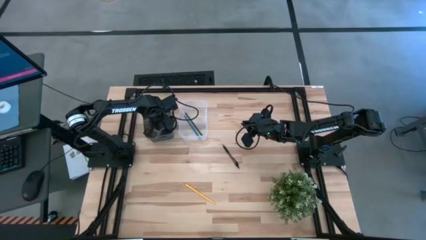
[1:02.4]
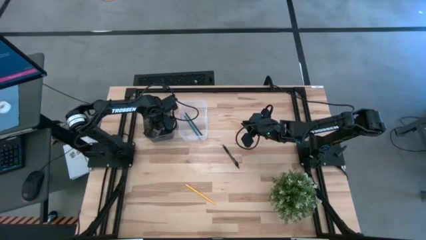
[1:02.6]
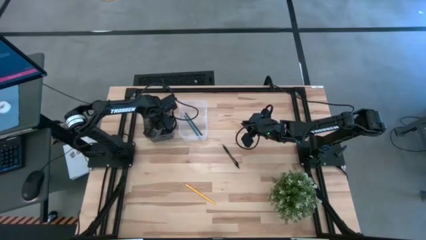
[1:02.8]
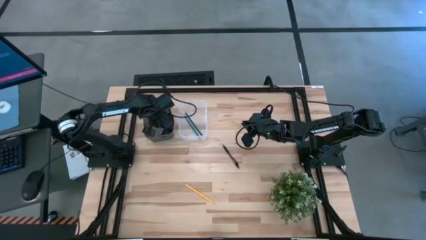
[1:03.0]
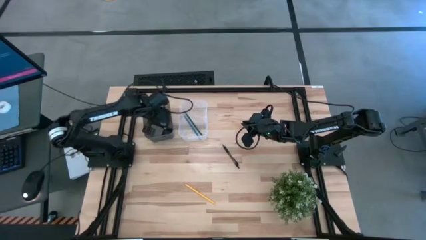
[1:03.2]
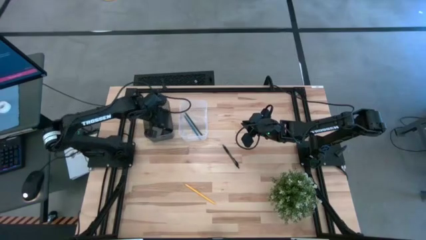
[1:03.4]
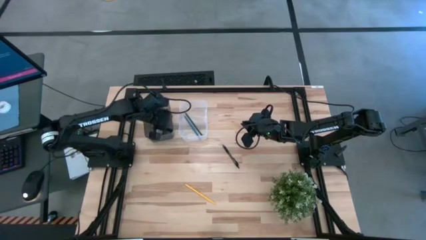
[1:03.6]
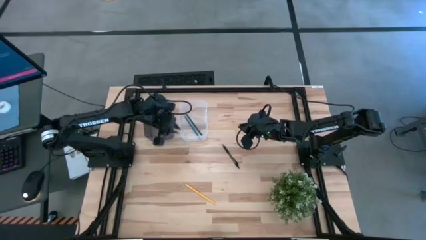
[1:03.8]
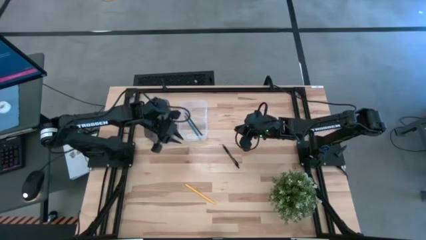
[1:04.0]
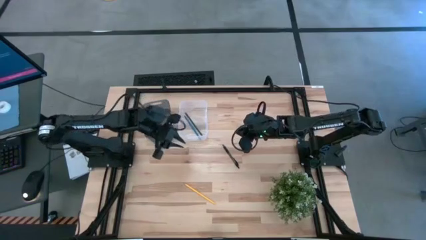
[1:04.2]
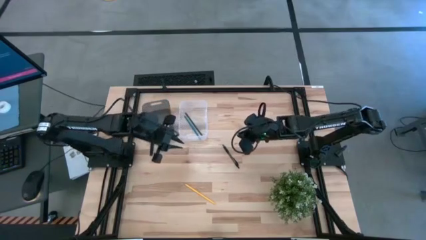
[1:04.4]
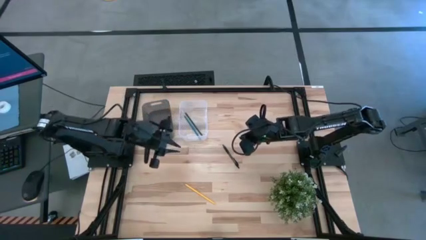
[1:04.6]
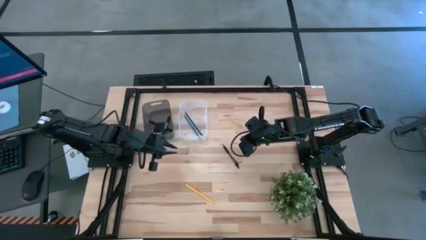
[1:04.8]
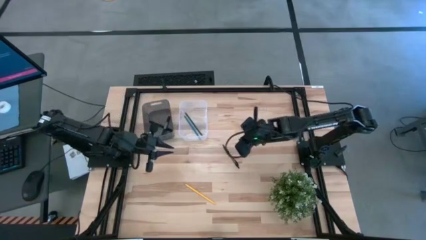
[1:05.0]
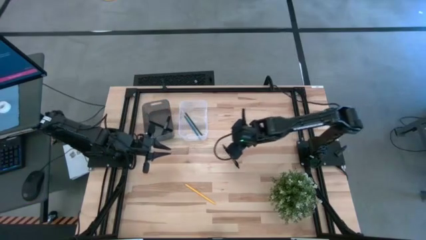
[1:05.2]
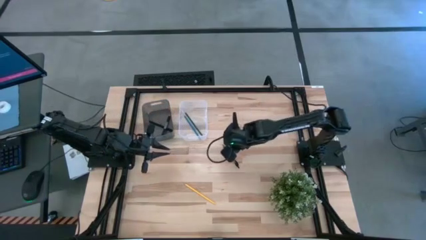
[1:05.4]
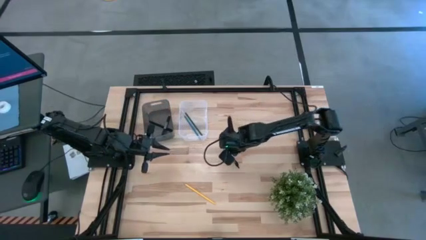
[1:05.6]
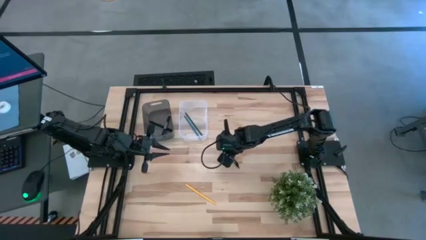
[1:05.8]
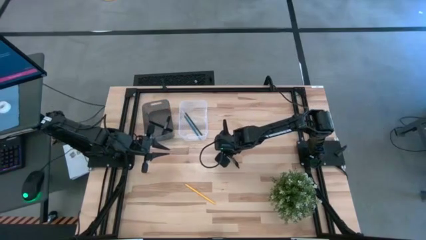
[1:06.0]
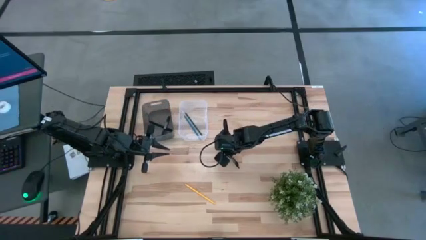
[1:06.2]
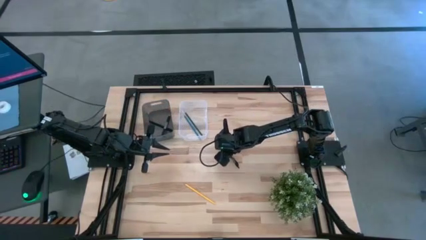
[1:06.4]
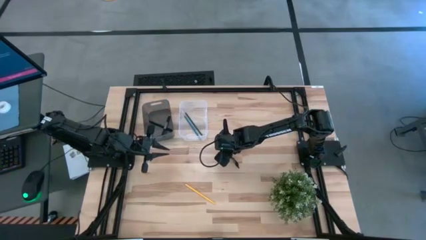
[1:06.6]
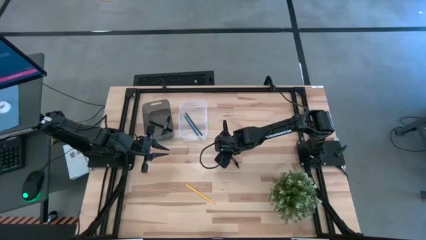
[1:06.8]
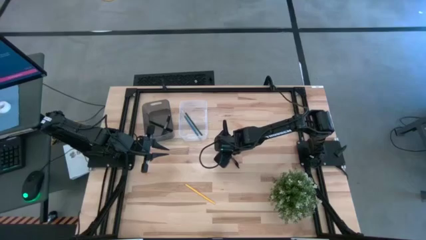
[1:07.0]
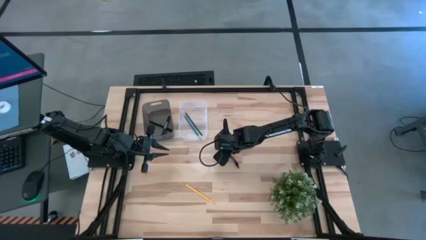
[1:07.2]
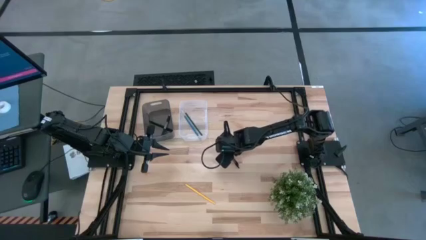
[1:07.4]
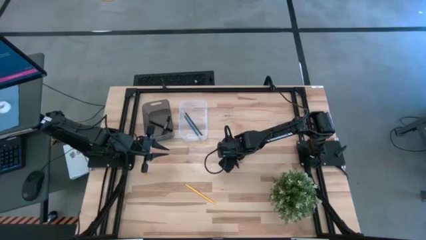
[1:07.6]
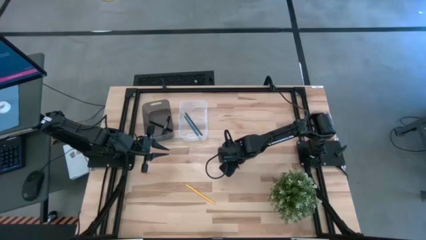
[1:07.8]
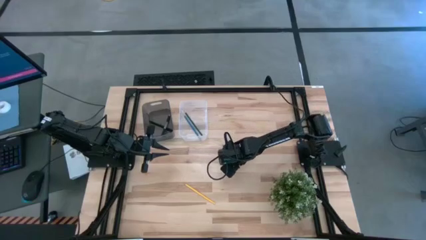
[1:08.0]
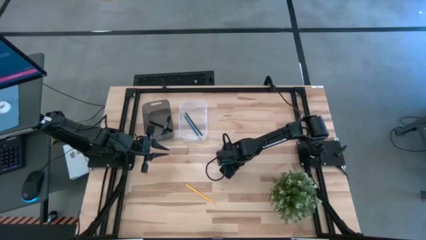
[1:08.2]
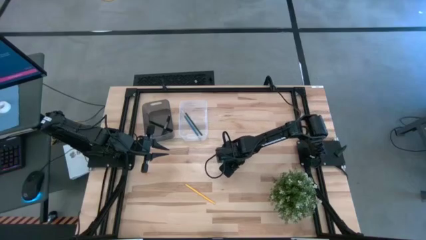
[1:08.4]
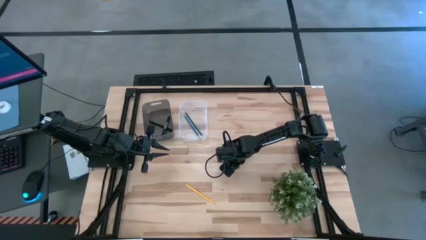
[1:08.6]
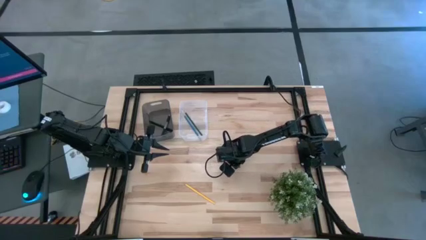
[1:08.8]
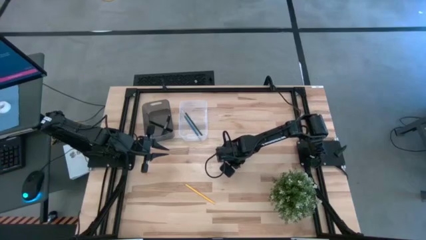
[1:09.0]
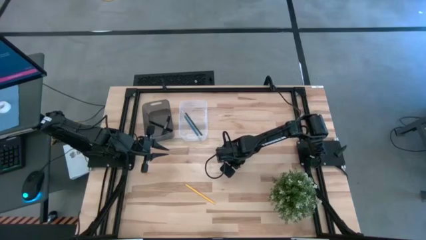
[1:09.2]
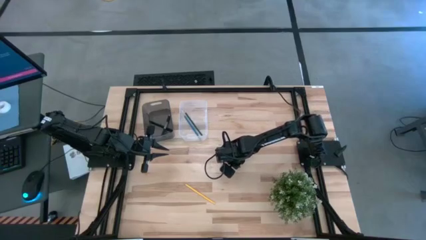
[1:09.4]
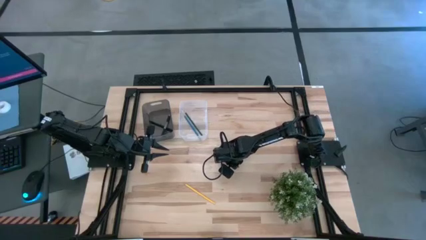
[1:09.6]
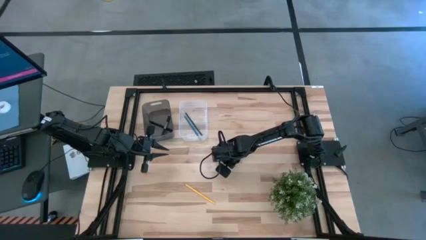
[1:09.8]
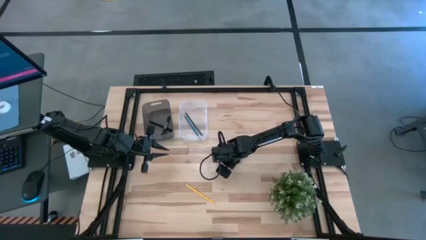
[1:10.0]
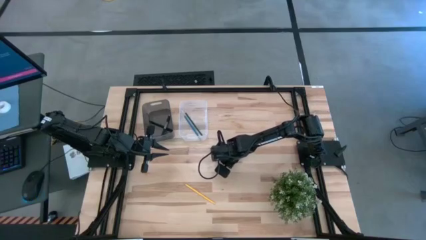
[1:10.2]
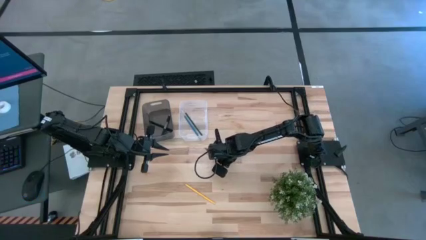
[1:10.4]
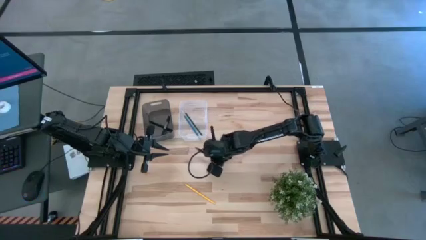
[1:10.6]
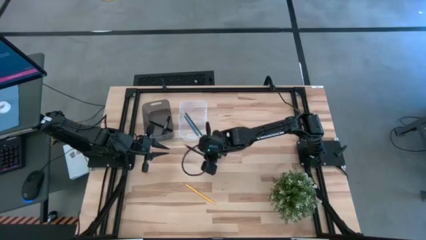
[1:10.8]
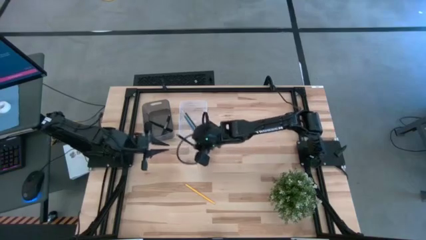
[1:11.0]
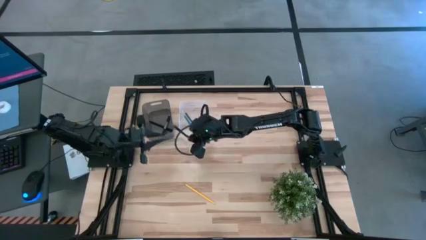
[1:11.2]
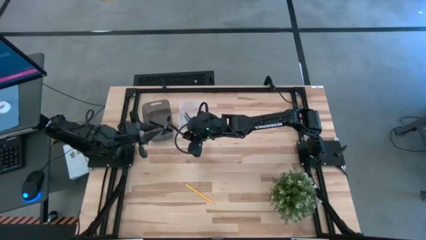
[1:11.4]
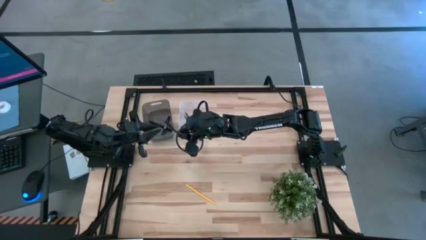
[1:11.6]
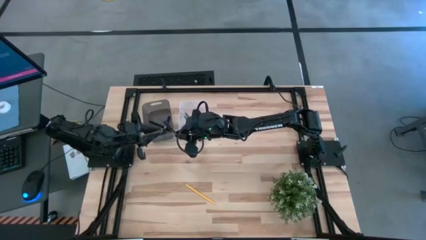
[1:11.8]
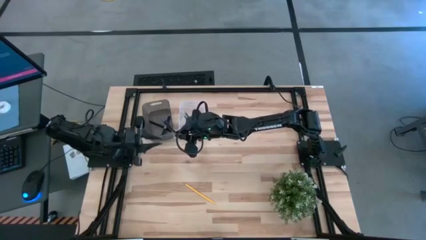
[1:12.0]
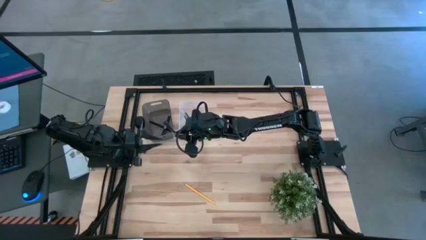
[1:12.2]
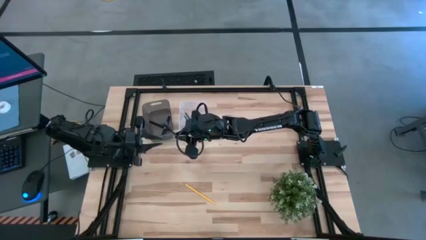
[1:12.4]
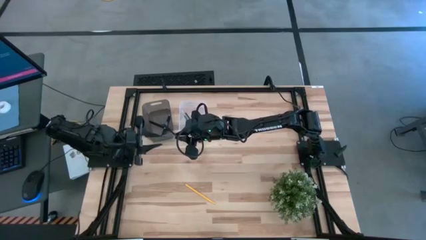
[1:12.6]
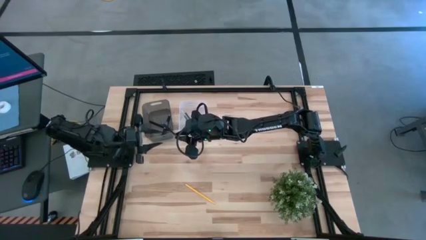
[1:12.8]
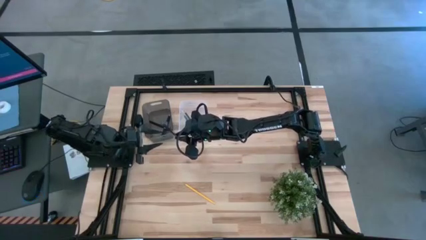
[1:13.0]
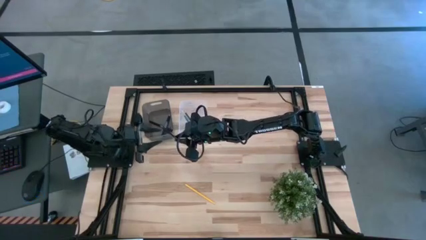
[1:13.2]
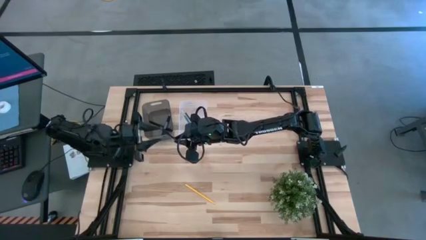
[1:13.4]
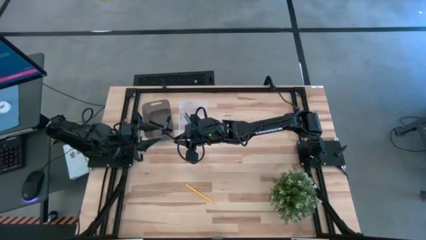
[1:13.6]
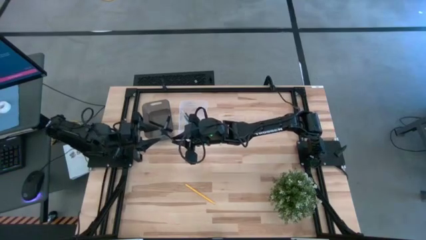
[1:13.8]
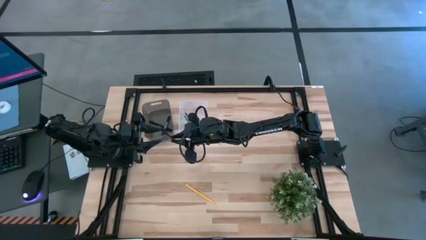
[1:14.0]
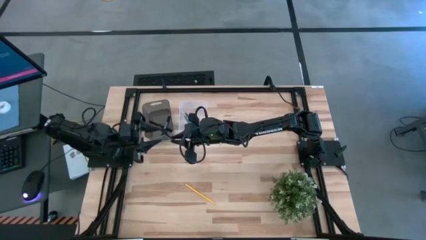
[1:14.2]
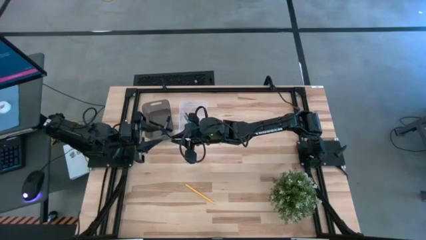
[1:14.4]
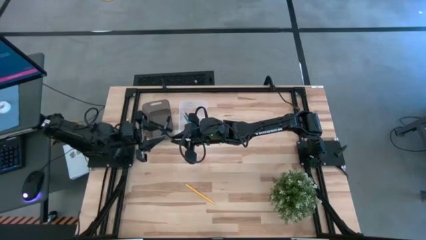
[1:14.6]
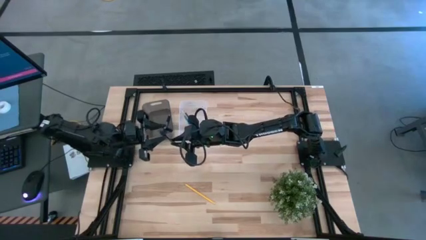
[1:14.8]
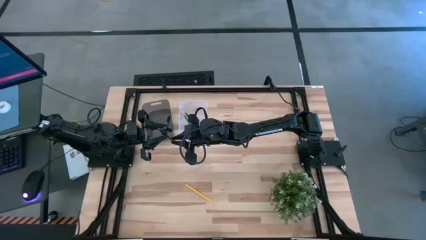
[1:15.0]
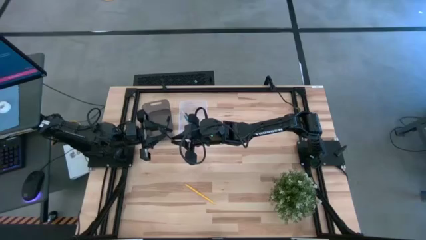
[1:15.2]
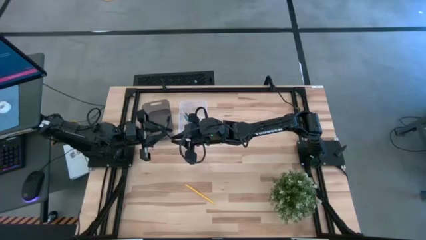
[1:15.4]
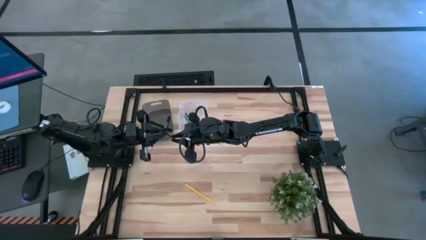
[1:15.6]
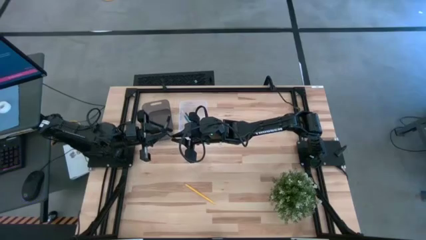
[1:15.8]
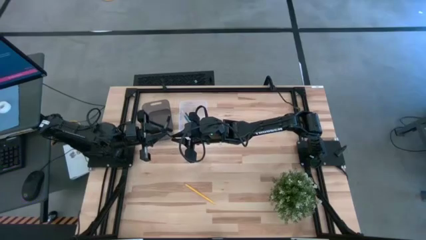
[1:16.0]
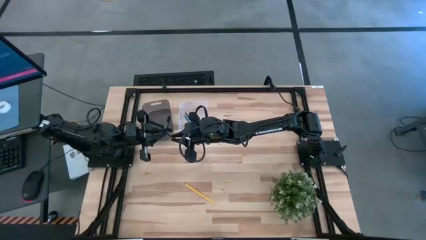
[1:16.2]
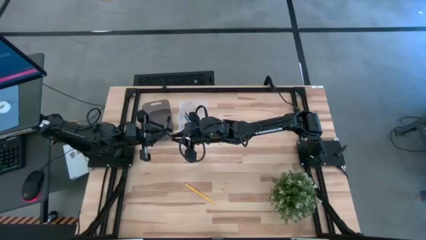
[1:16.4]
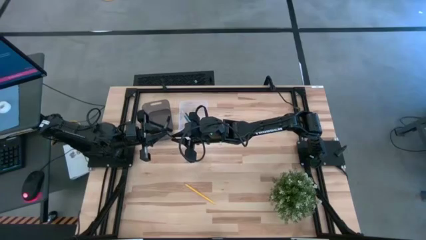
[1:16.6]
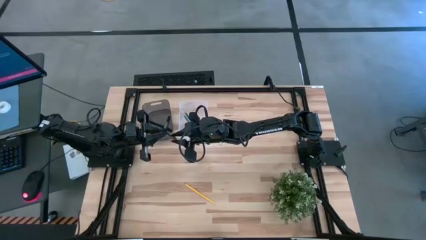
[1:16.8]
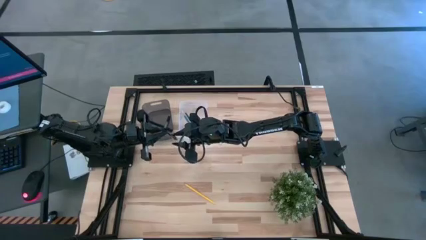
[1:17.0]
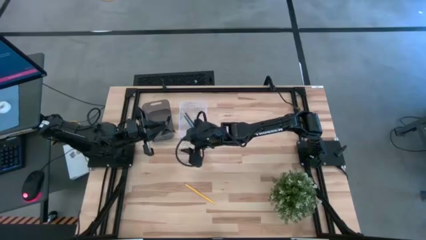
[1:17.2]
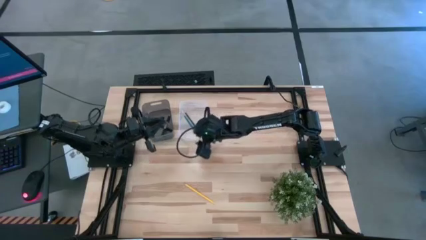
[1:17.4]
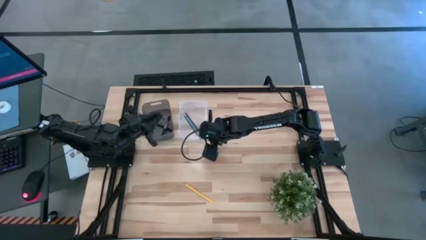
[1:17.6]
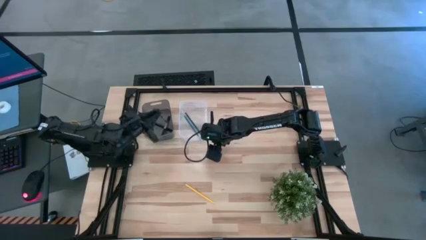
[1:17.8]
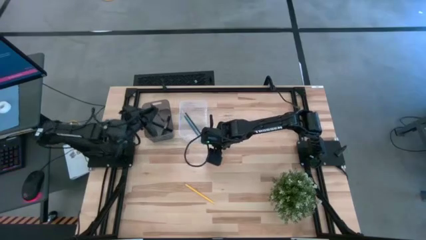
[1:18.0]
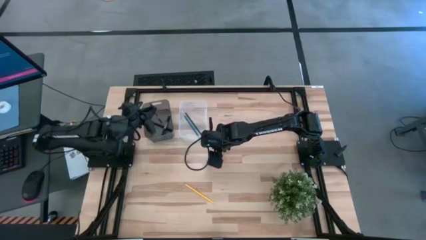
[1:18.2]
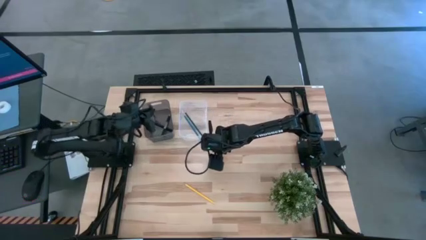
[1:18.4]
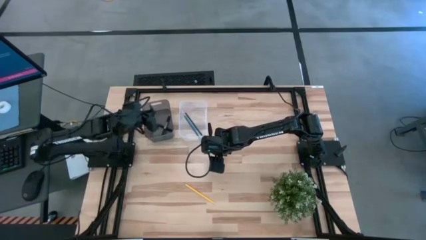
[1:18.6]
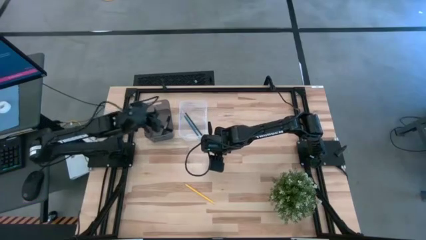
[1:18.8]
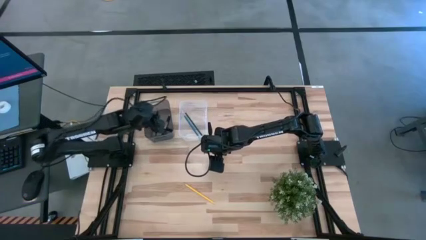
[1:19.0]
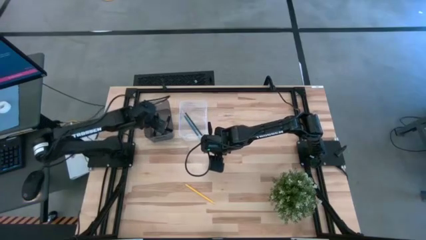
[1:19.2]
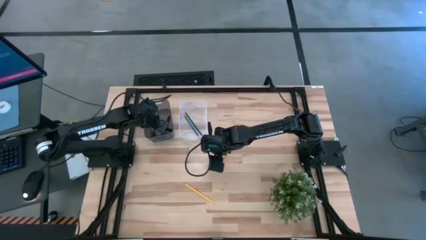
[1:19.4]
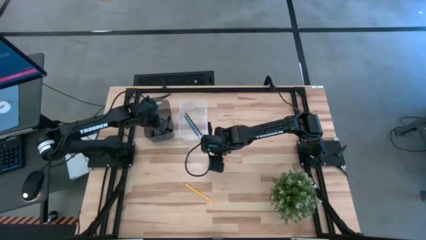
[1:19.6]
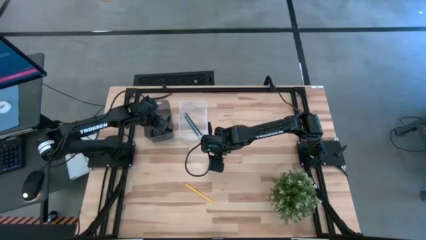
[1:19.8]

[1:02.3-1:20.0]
Task: Sort pens & pencils
Put the black pen into the black bin
